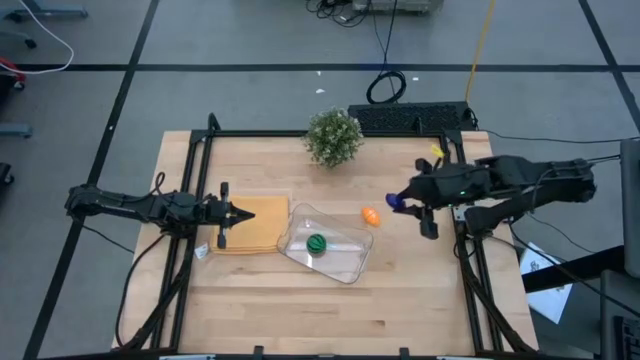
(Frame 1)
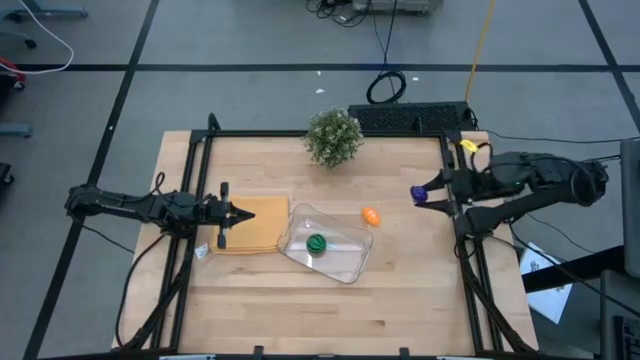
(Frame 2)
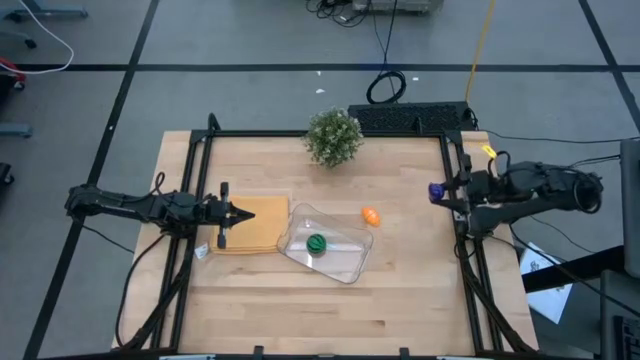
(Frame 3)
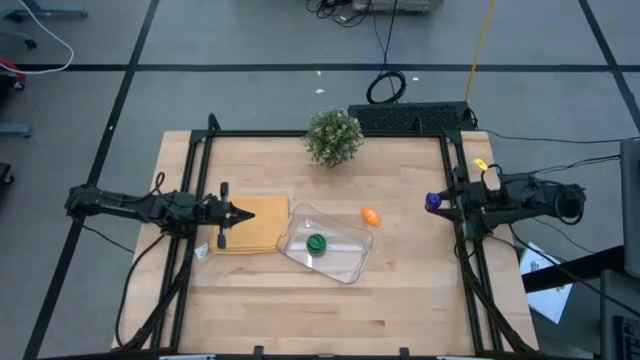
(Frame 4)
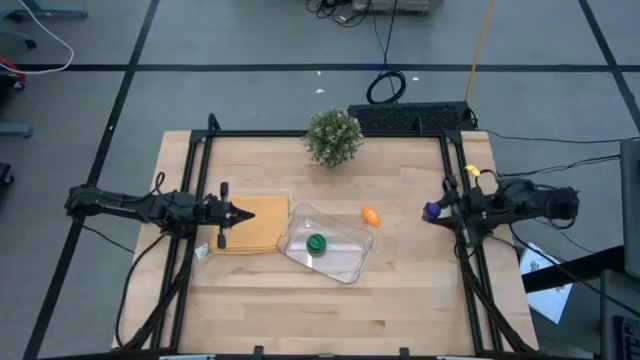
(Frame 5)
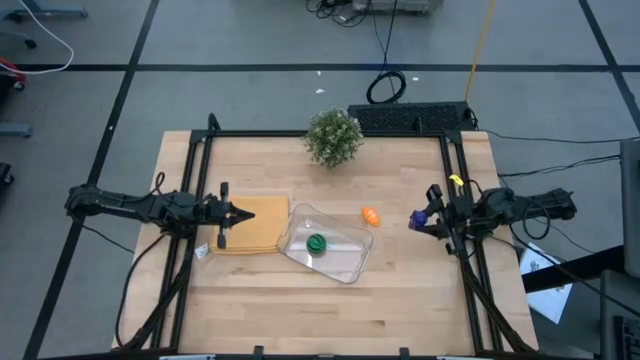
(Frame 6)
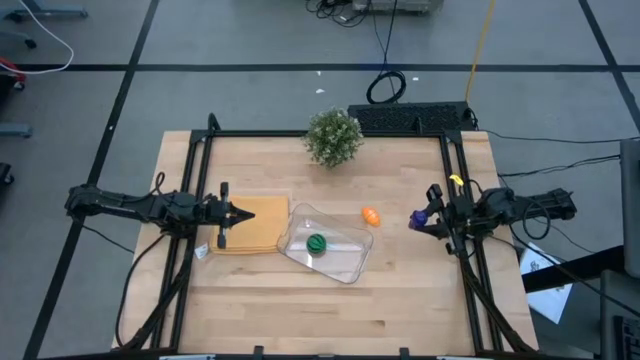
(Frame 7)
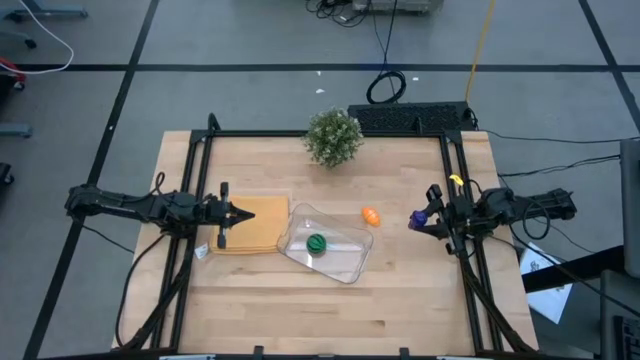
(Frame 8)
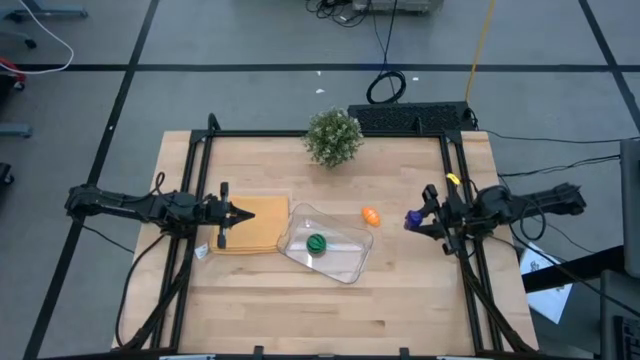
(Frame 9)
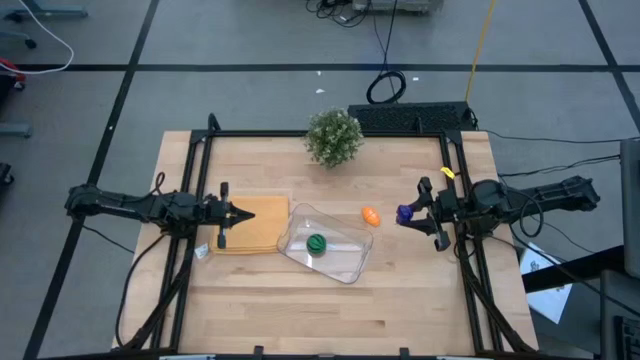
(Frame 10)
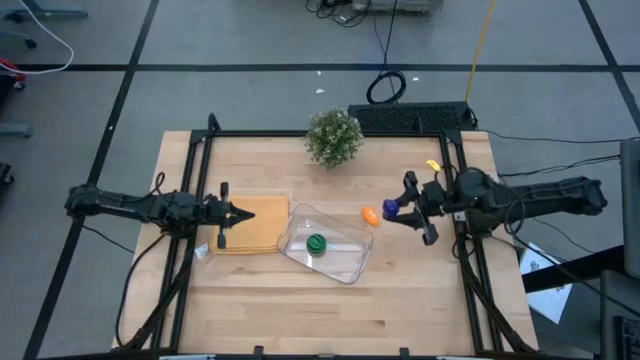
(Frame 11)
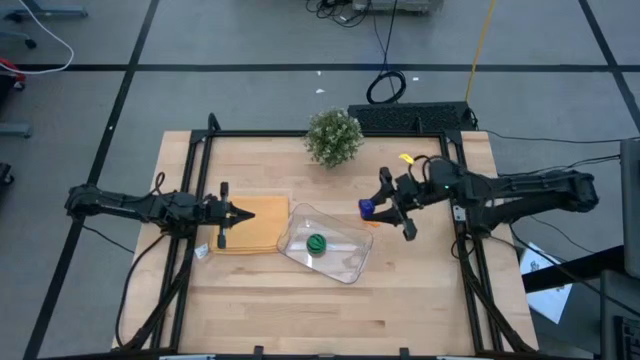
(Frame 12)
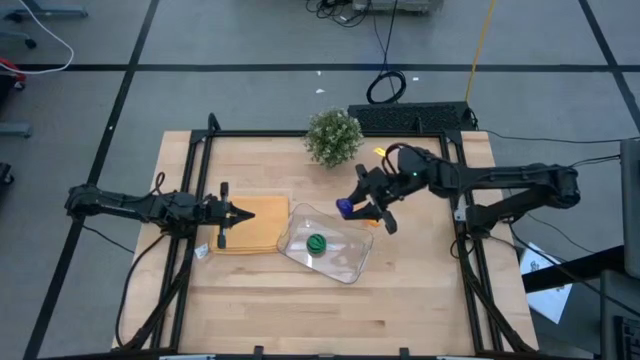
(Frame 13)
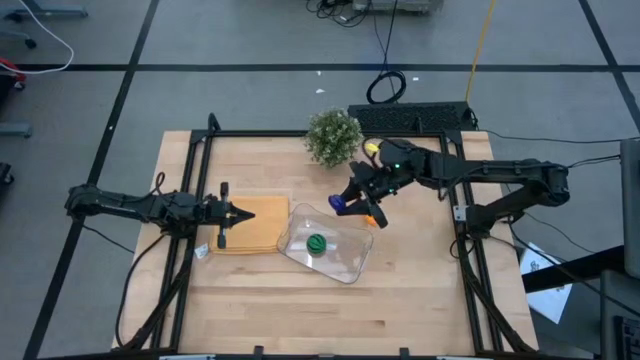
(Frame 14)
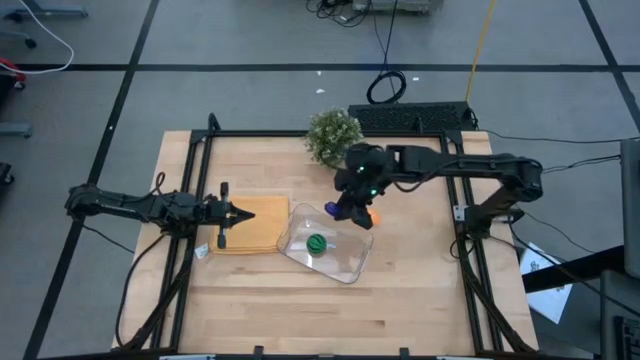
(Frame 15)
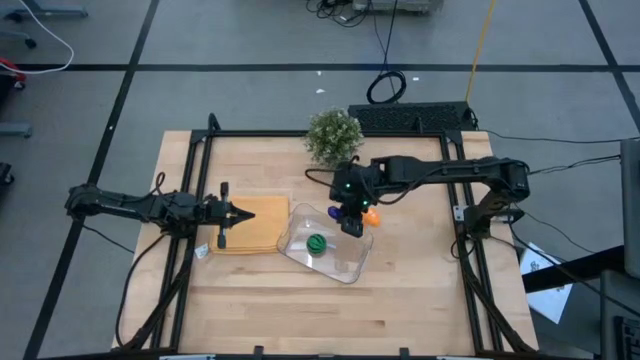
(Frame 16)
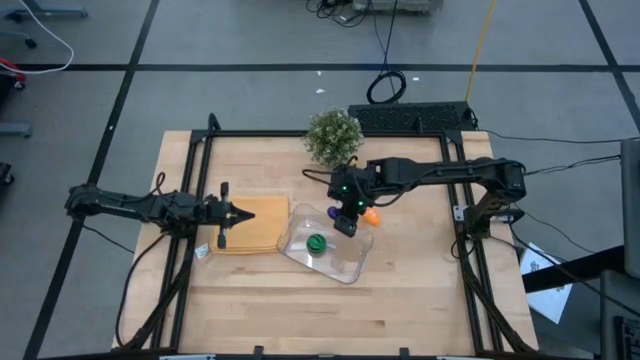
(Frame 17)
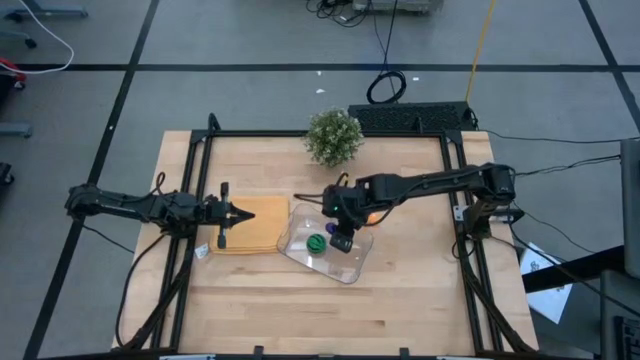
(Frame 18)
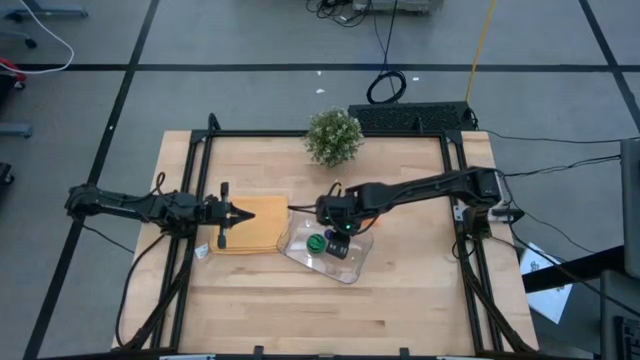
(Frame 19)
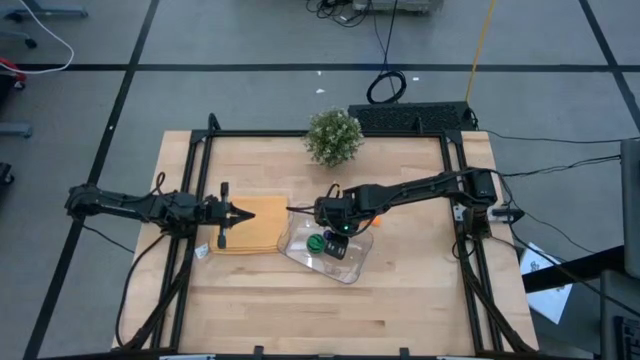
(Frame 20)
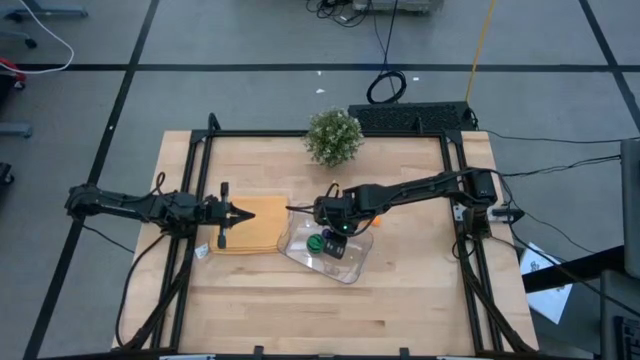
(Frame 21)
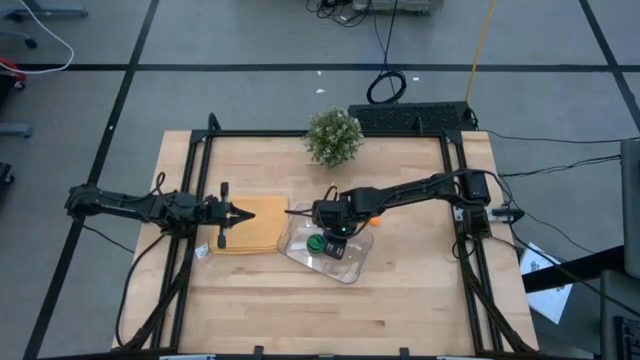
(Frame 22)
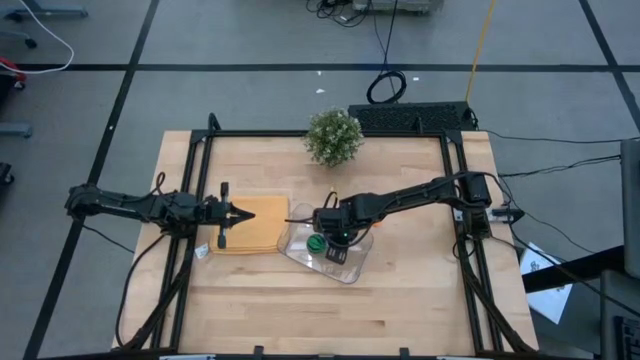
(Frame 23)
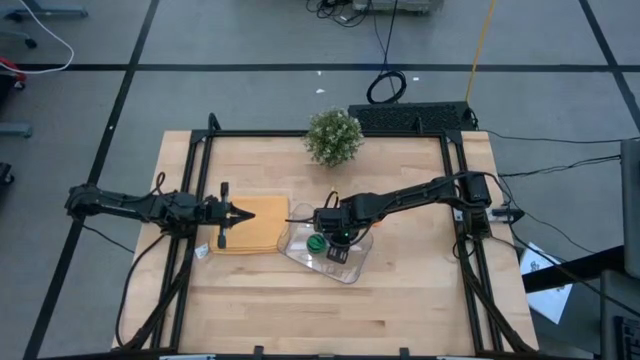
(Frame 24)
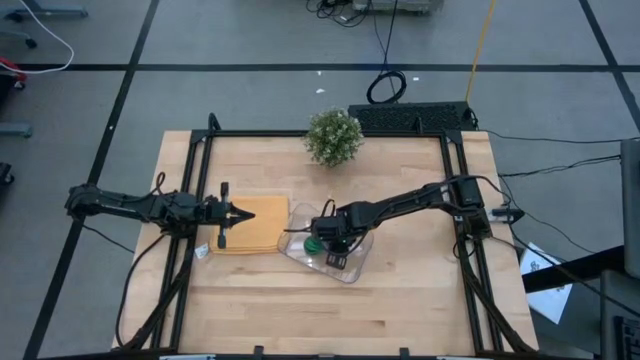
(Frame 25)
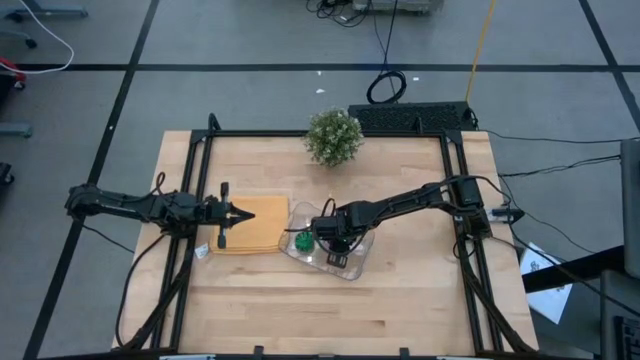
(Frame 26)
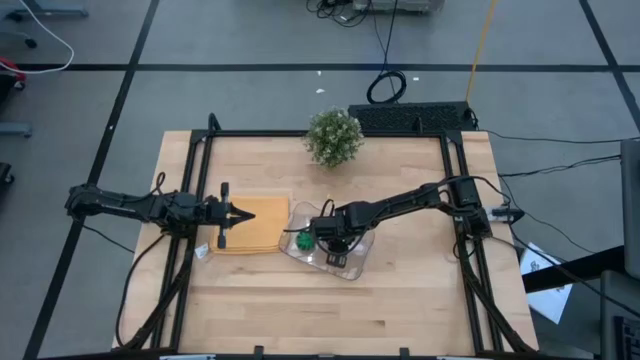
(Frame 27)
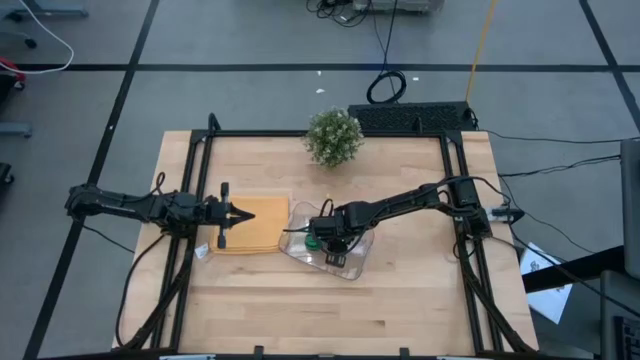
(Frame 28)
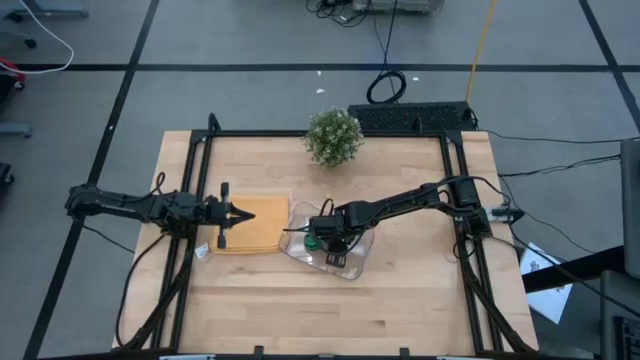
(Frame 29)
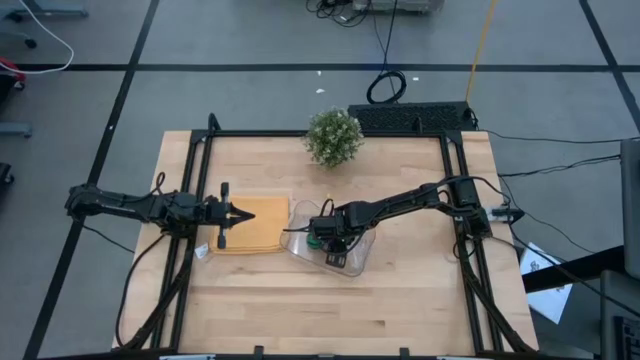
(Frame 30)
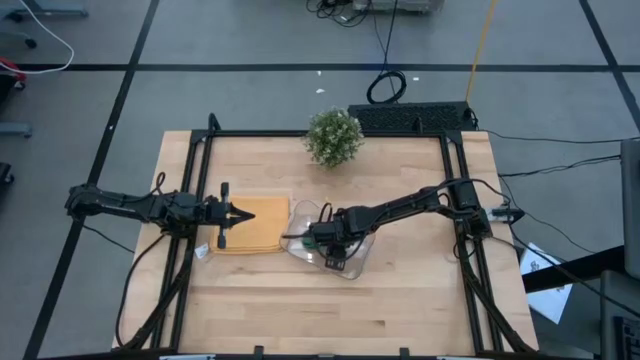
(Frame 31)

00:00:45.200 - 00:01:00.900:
Task: Pick and placing Produce into tupperware
Put the eggplant into the transparent bin

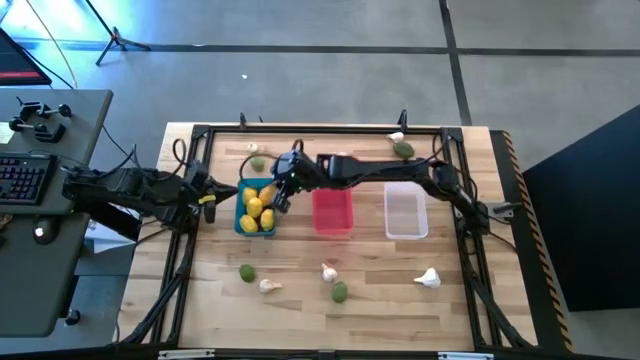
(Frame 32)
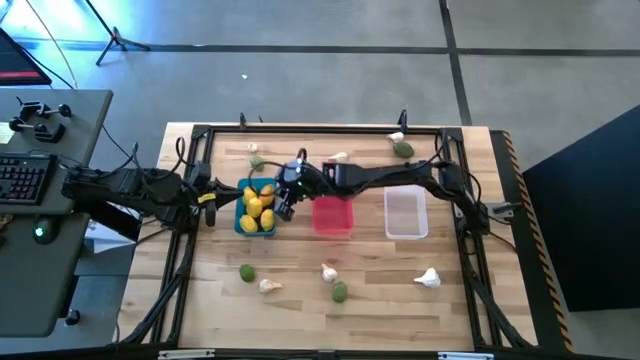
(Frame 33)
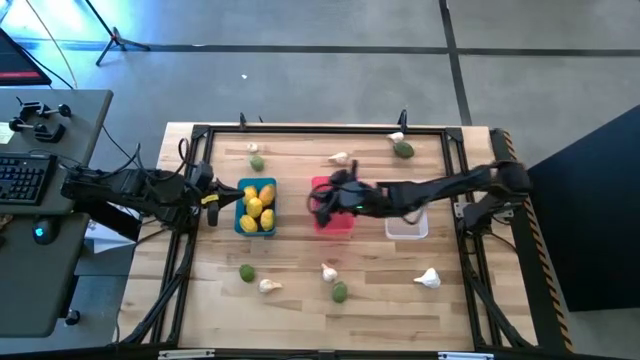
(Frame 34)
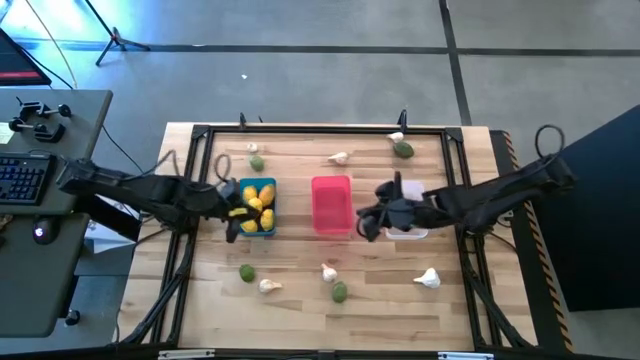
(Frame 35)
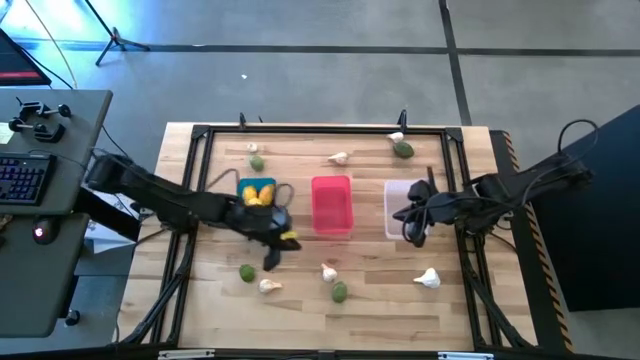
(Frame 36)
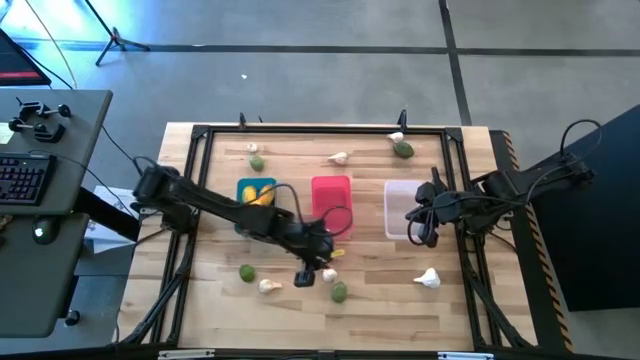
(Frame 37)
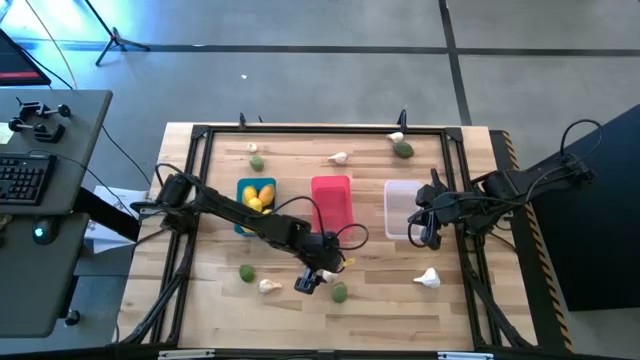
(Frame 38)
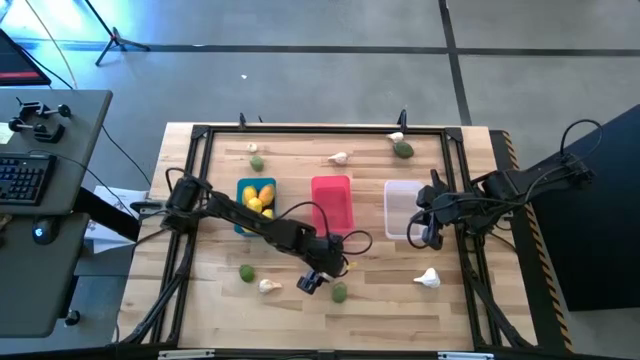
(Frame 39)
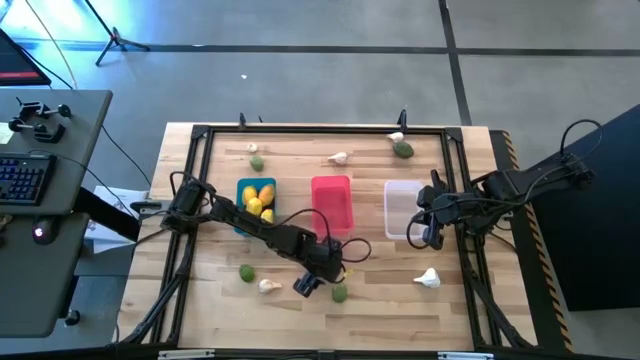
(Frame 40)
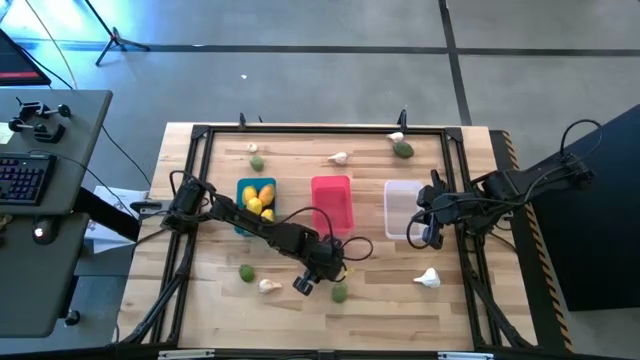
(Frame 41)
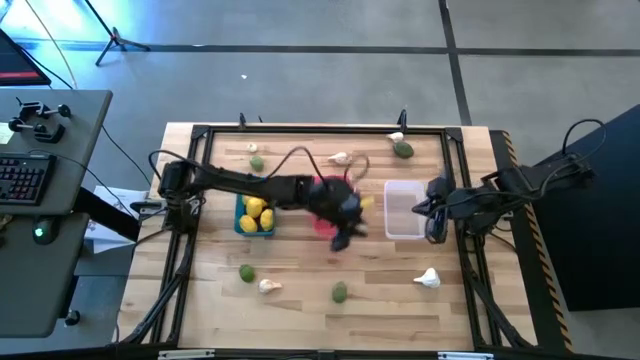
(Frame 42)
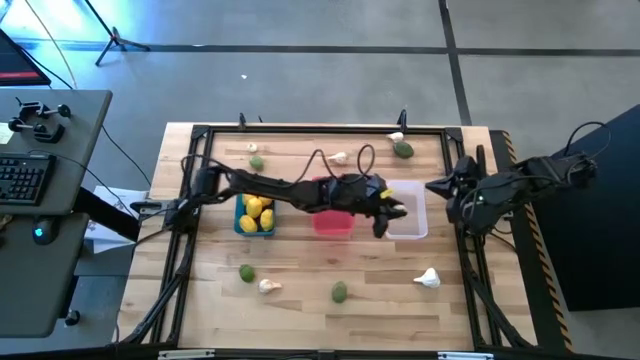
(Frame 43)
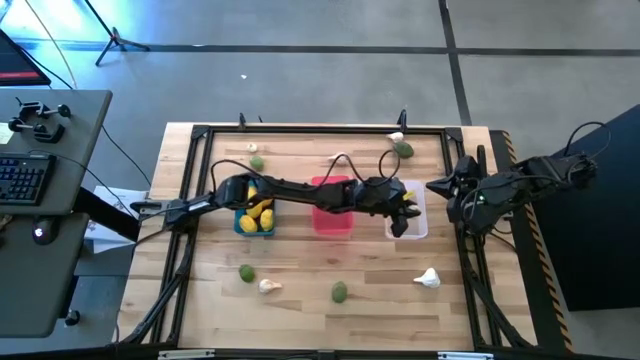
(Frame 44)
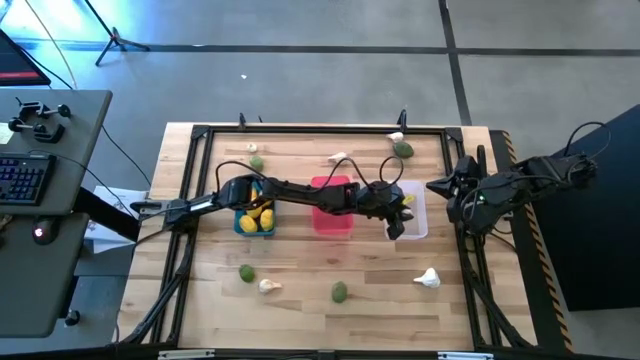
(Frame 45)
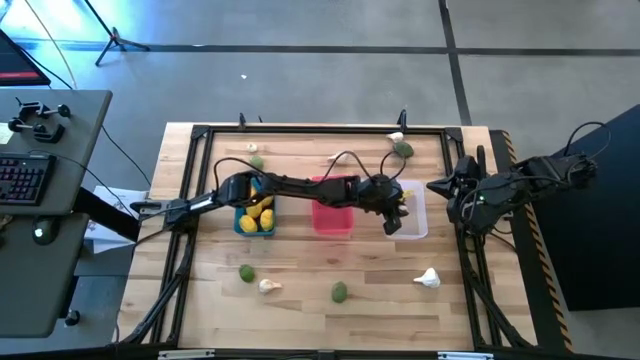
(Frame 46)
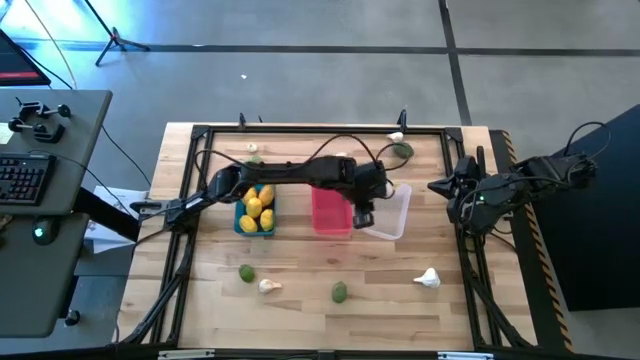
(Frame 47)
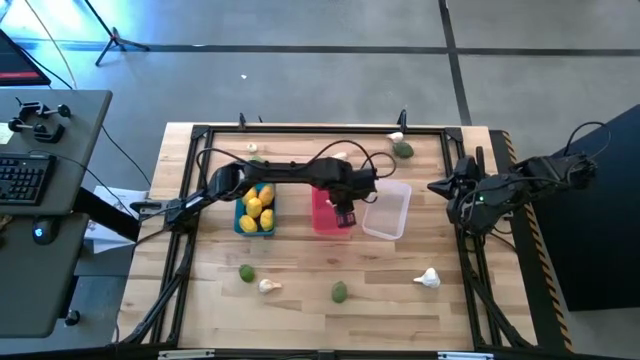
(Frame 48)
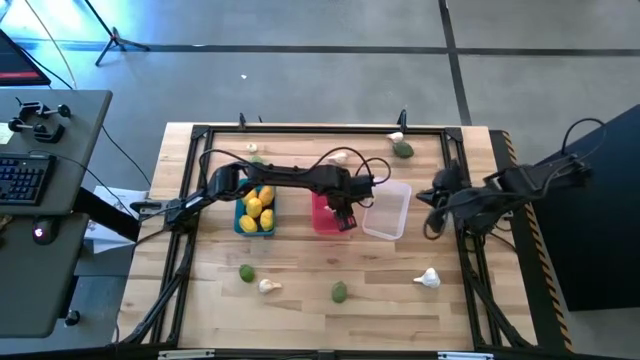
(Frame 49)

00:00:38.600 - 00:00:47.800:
Task: Sort produce into baskets
Put the bottom center white garlic into the red bin
